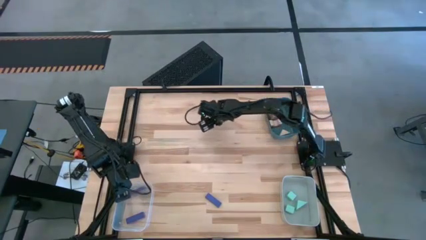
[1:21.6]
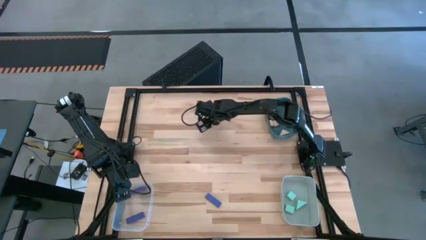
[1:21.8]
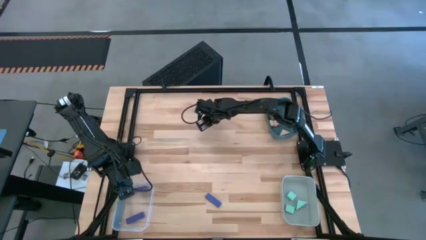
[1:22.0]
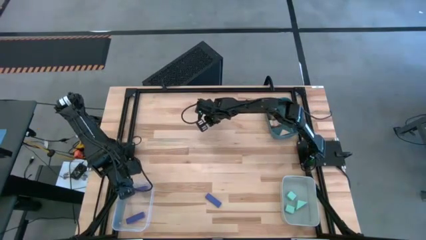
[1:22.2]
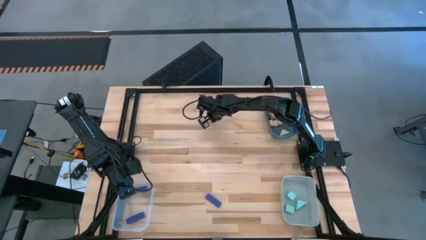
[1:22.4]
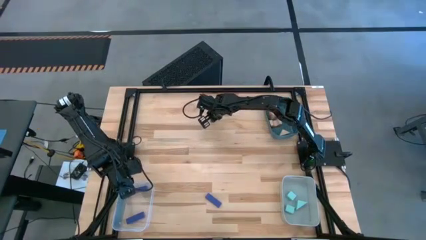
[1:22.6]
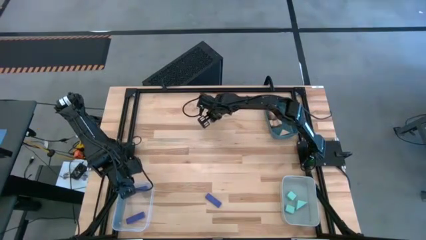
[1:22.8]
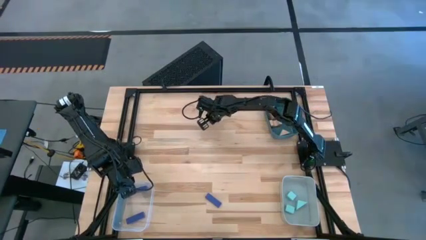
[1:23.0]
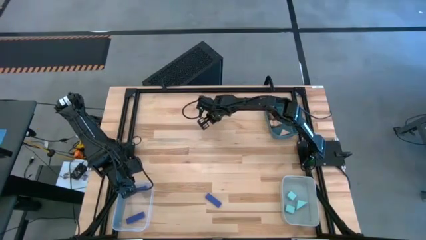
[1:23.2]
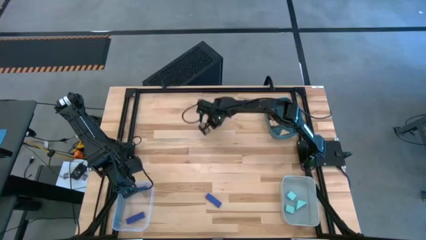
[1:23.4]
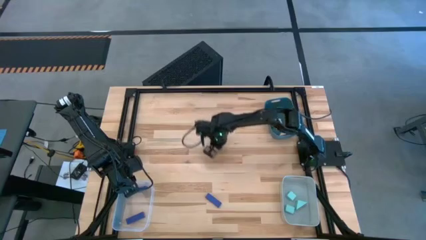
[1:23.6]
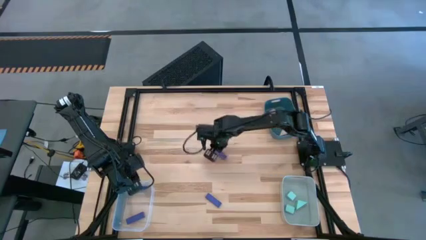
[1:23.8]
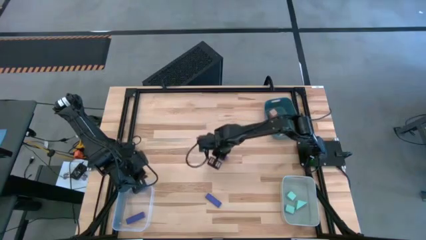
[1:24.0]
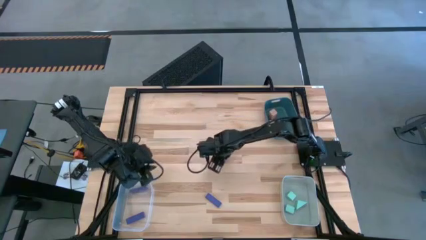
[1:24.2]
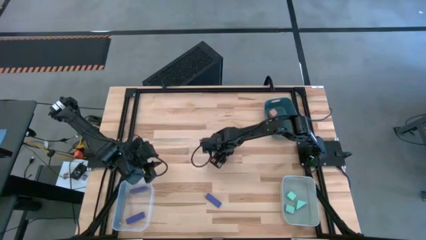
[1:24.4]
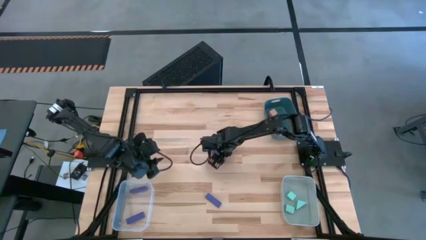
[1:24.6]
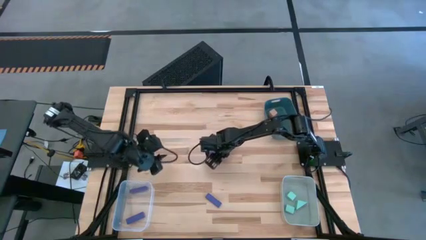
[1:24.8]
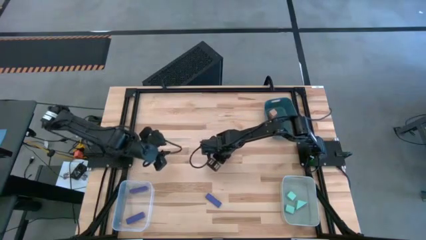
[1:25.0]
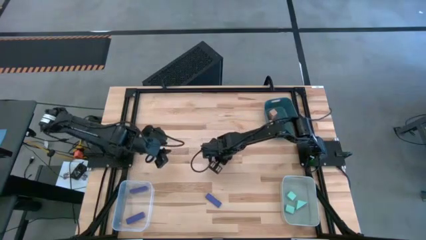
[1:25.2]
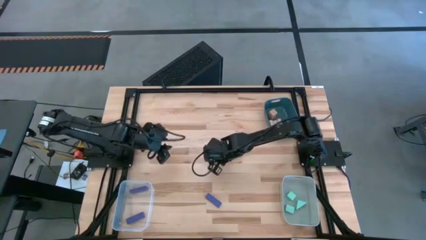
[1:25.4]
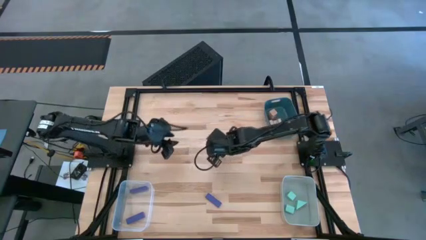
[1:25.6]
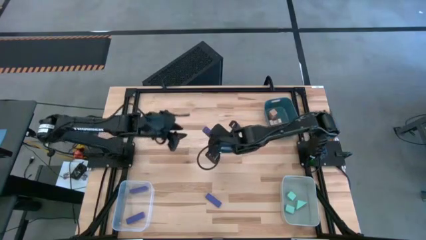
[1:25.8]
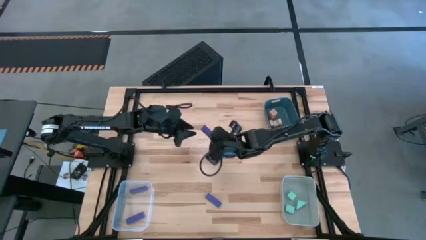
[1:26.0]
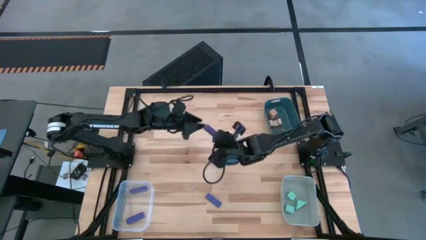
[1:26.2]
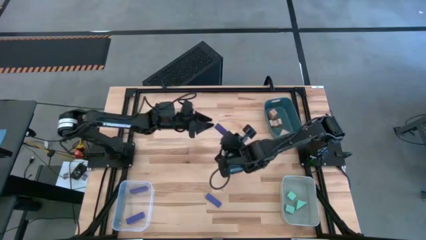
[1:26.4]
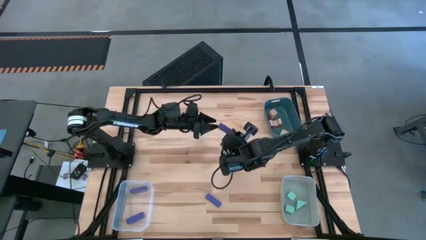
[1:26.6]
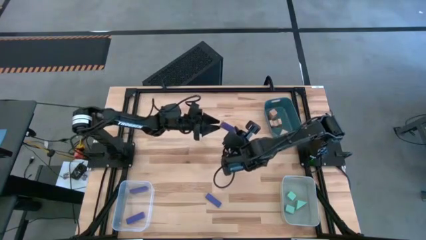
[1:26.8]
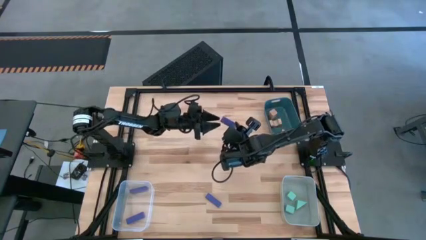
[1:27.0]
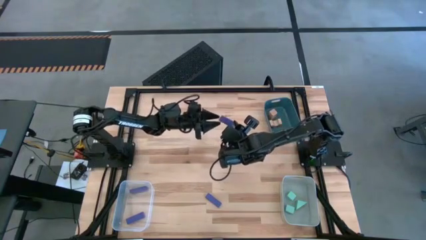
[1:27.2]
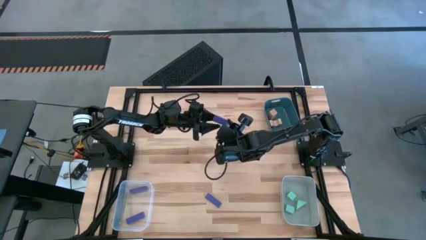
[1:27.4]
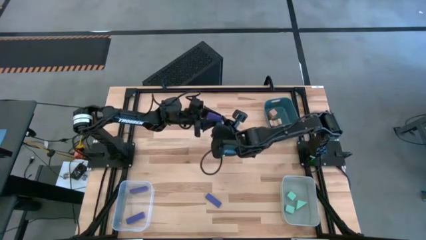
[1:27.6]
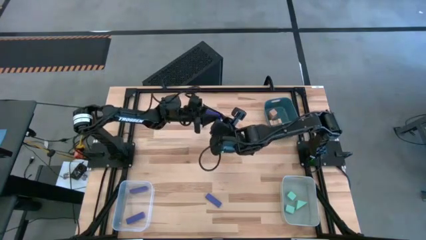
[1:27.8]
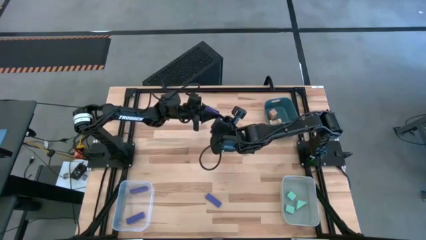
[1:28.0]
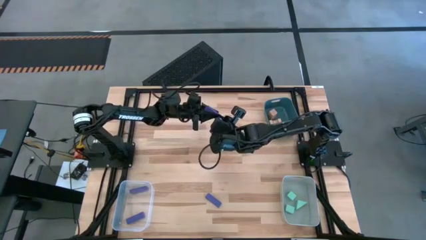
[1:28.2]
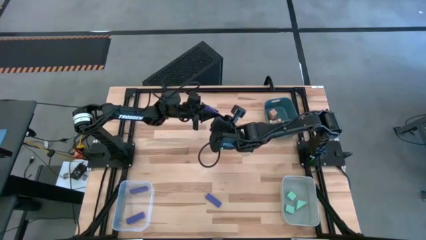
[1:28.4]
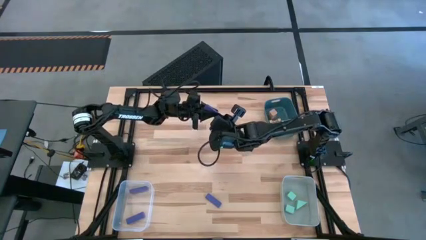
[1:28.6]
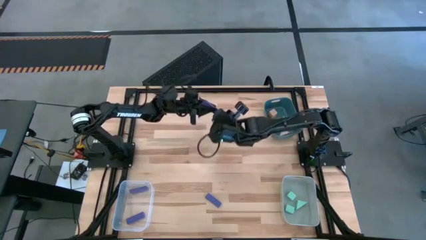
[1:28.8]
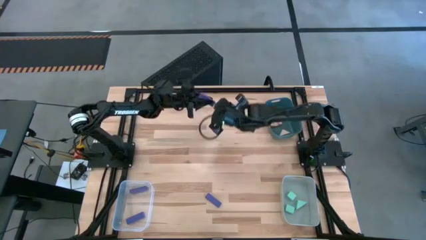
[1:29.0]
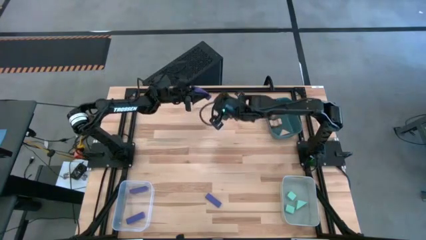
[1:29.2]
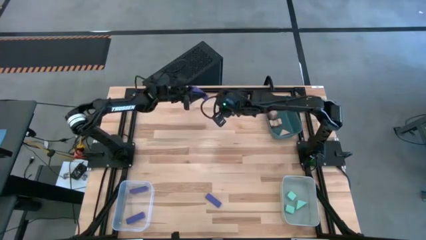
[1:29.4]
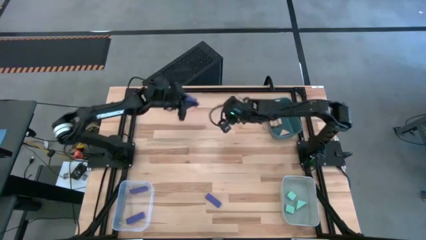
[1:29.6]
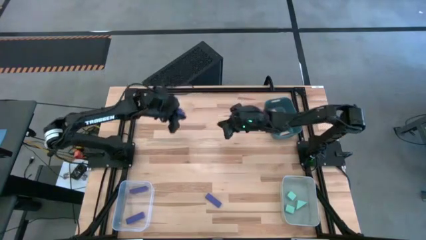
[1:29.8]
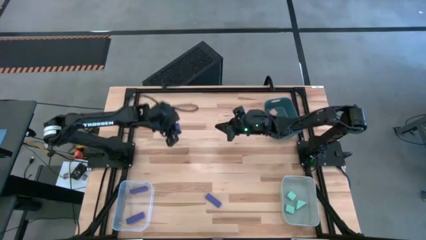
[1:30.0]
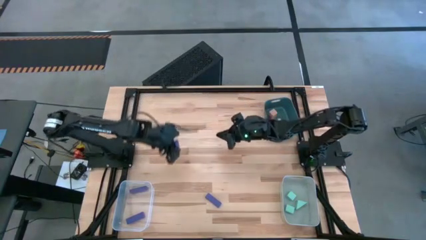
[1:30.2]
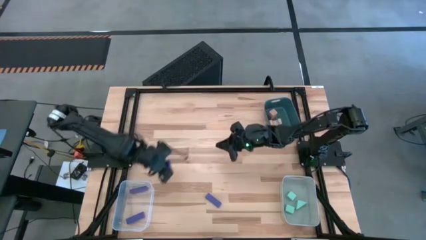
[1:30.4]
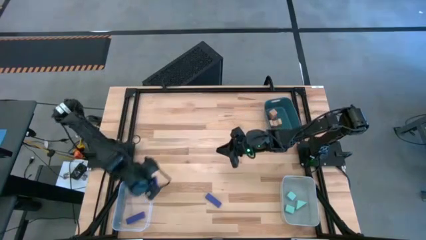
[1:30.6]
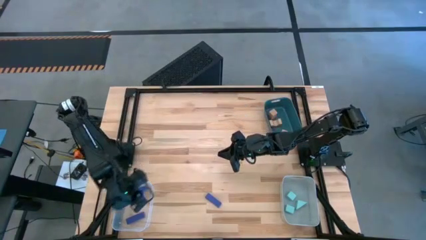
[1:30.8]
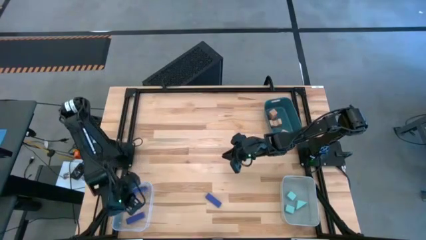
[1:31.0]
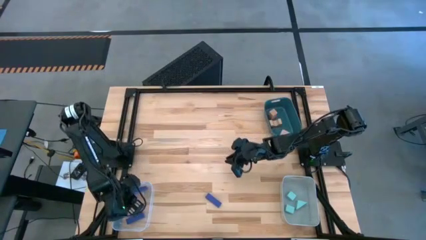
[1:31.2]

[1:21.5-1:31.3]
Task: Sort & place blocks by color
Put the top blue block into the transparent bin

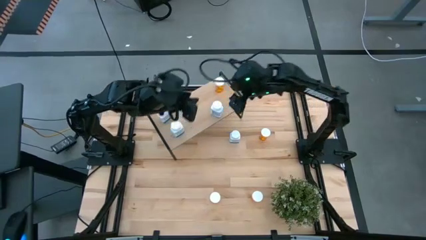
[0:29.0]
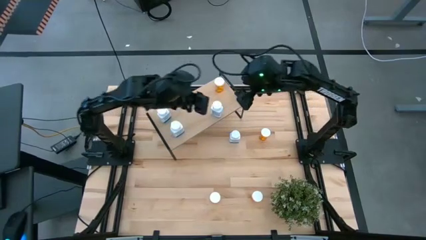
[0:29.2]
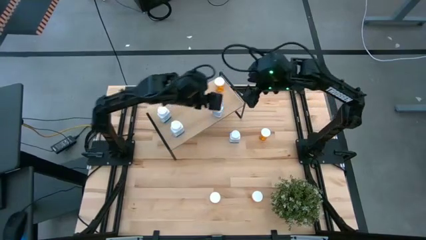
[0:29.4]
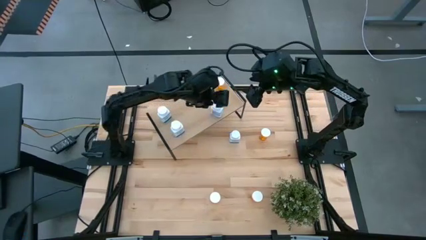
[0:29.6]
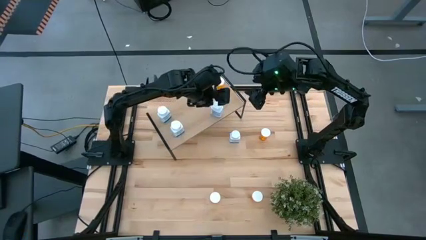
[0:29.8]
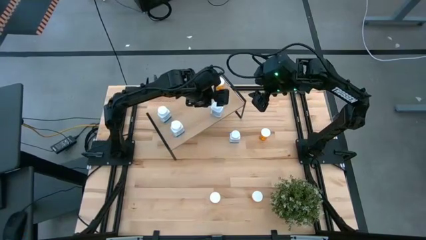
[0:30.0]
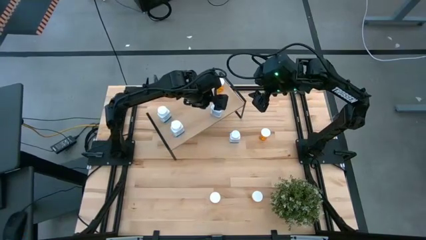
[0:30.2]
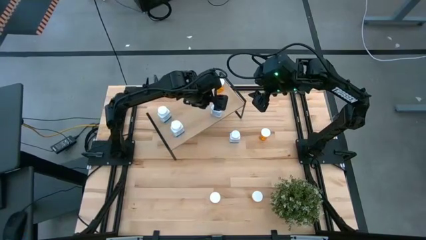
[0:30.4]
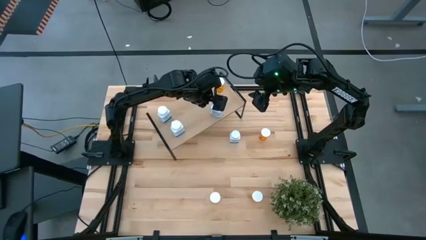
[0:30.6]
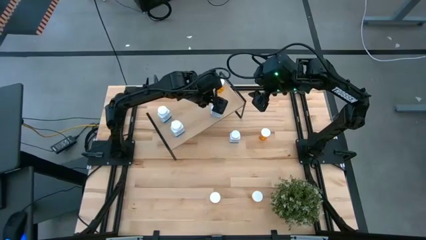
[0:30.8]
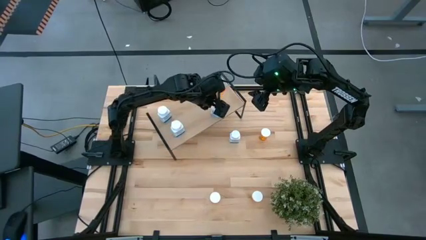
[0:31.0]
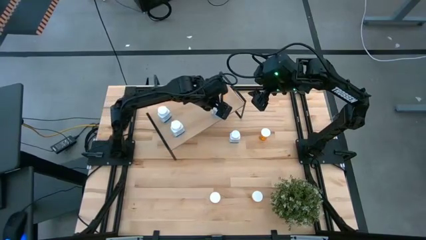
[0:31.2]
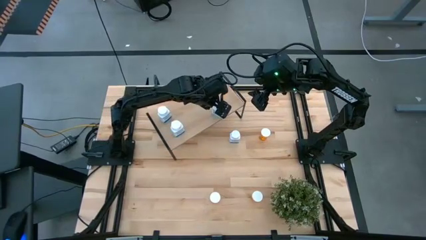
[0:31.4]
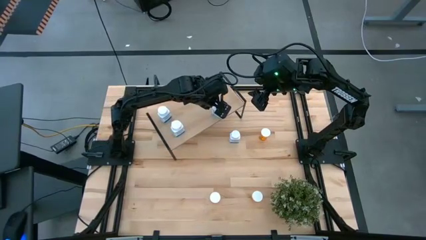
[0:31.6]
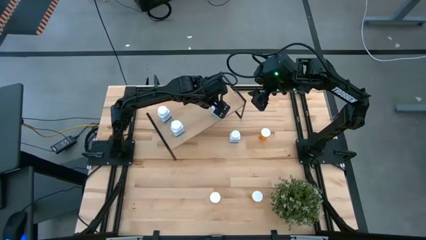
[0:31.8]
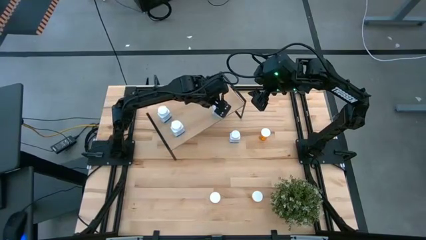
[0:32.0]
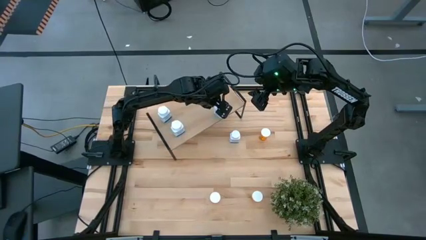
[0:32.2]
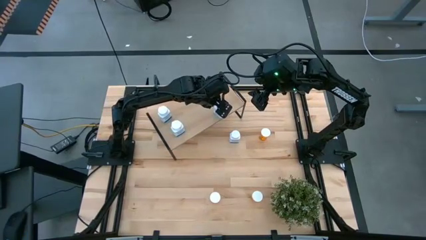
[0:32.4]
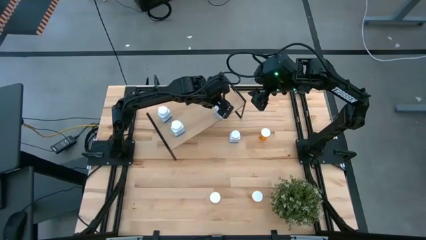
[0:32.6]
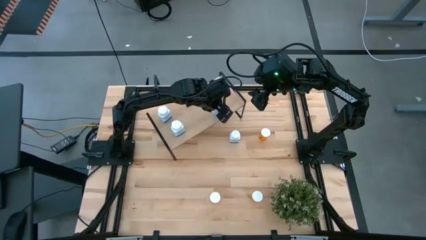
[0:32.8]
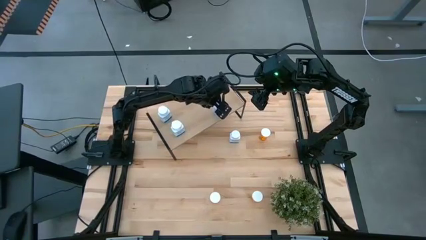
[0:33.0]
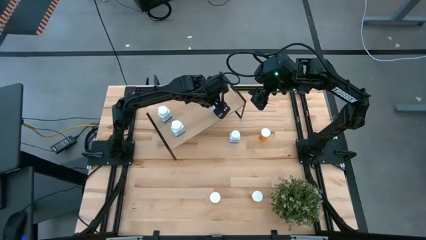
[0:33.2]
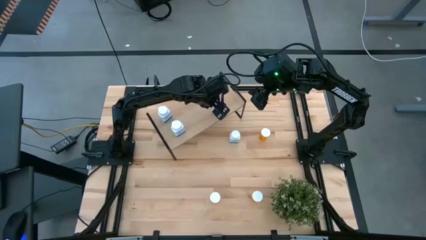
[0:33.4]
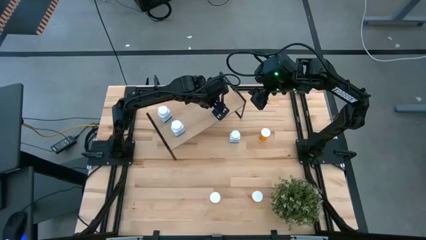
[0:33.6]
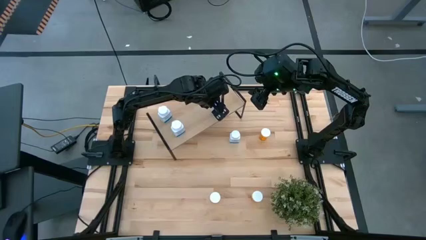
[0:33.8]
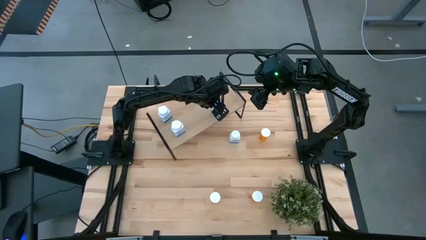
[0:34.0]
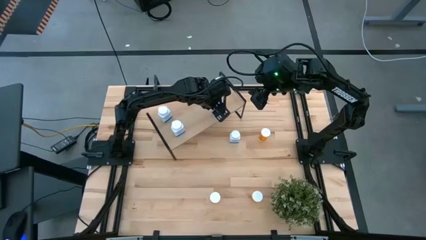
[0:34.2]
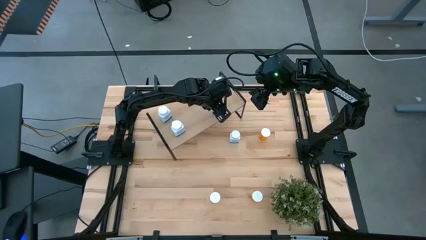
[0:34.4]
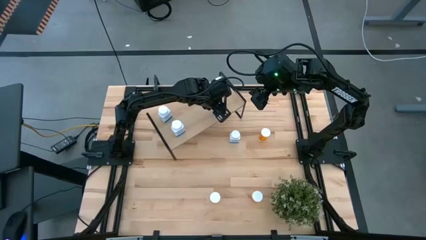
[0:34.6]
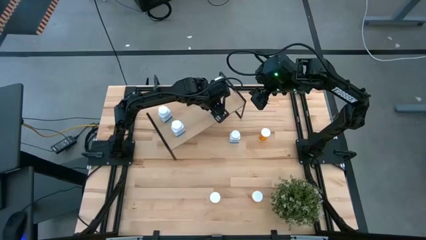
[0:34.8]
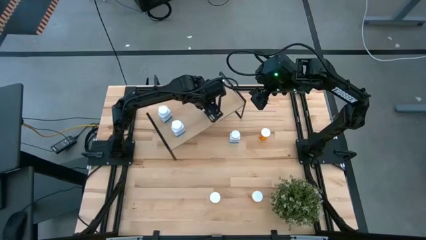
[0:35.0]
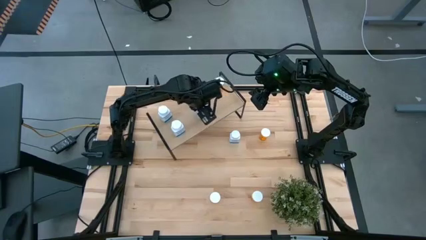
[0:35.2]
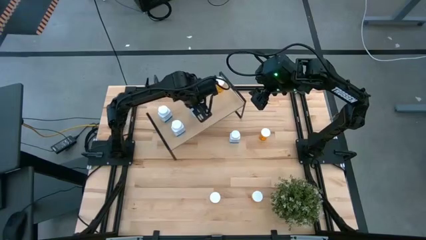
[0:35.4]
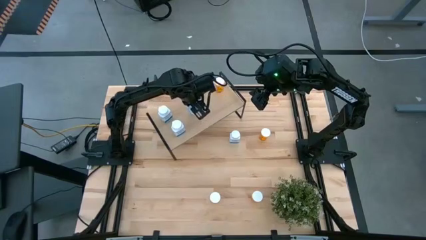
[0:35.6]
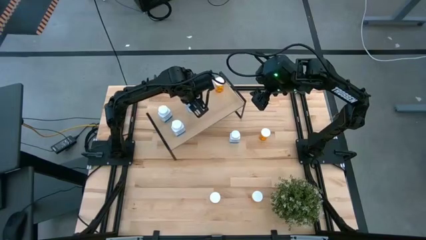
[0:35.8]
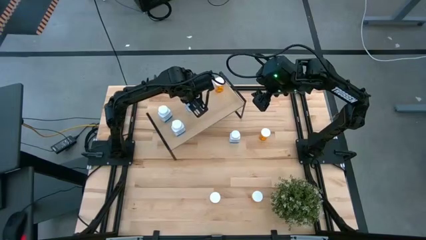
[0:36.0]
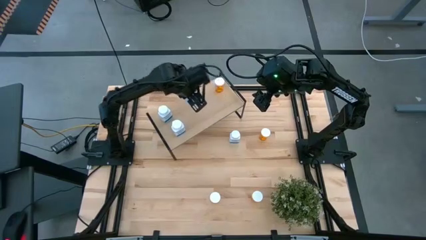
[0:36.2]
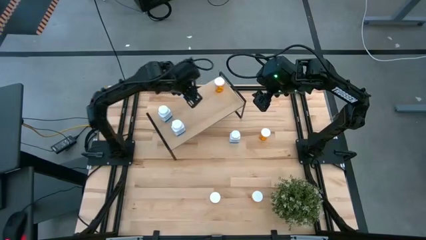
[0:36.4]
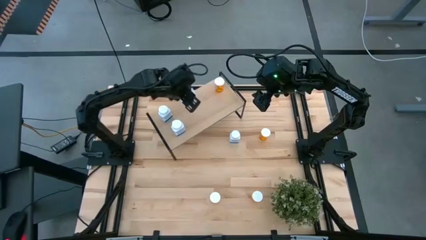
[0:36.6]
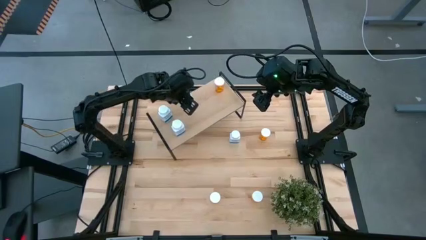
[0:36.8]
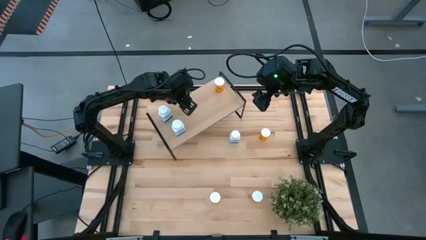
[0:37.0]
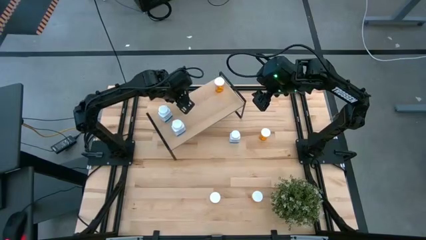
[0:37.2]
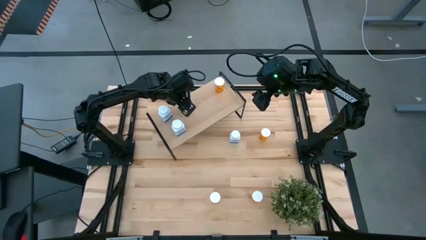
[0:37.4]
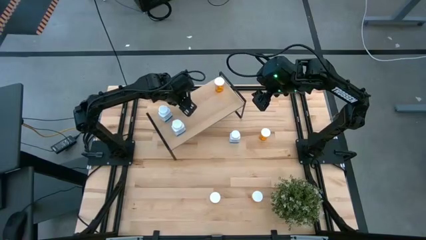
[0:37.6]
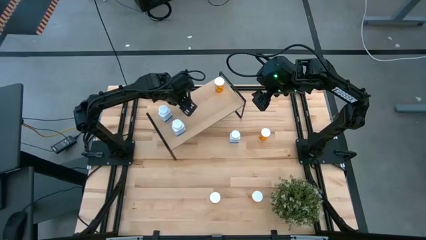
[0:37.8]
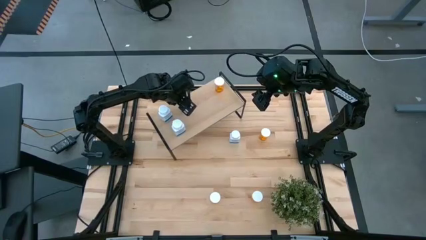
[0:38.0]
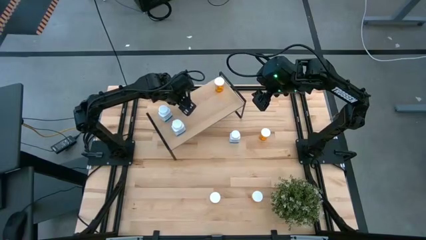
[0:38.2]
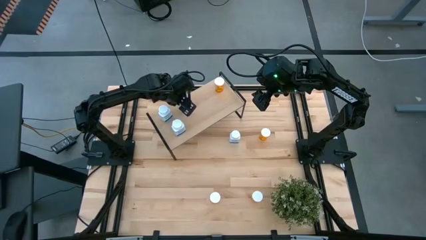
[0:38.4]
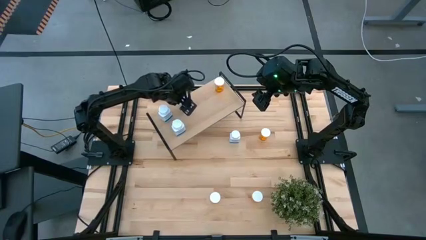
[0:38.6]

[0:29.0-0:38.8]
Task: Pick and place medicine bottles onto shelf by color
Put the white pill bottle on the shelf
